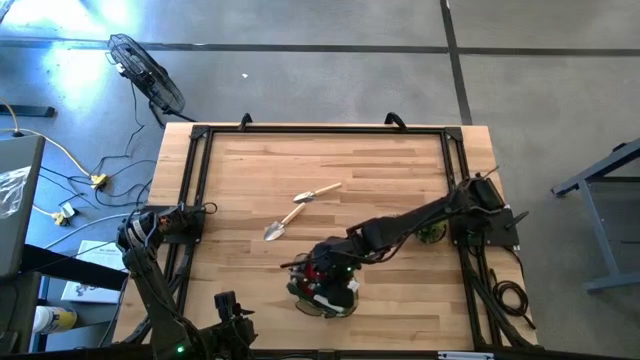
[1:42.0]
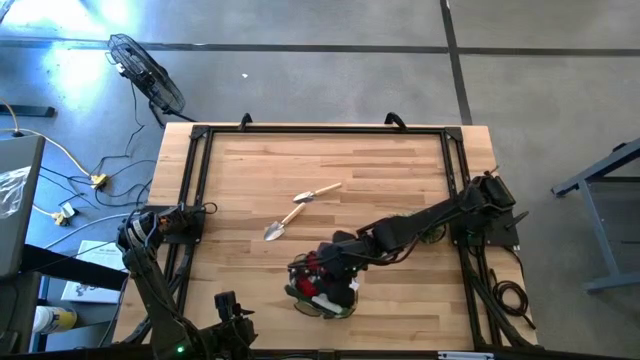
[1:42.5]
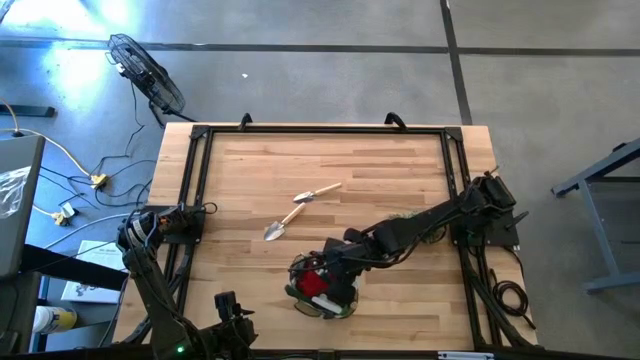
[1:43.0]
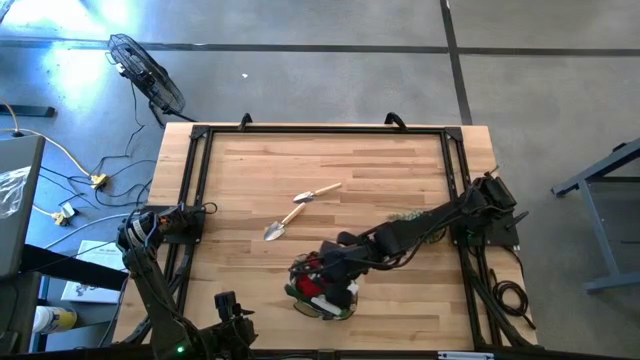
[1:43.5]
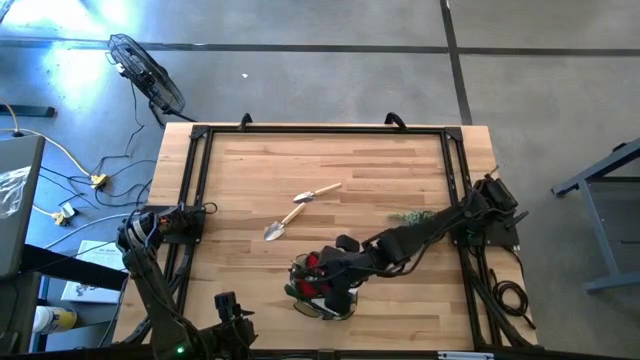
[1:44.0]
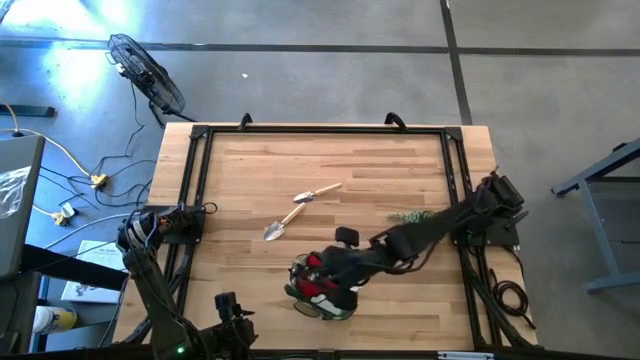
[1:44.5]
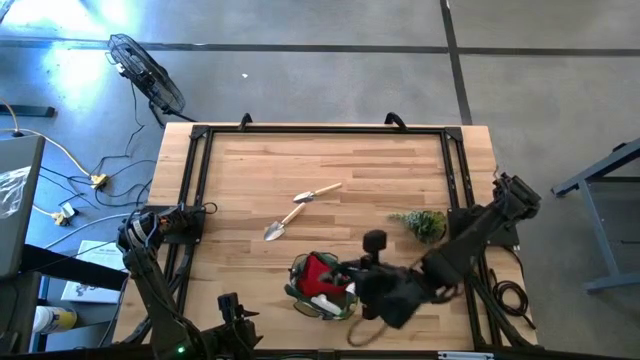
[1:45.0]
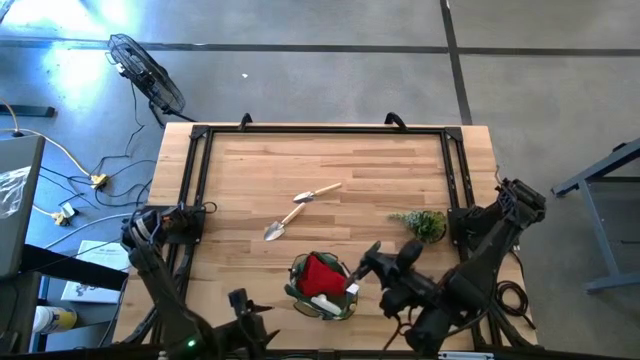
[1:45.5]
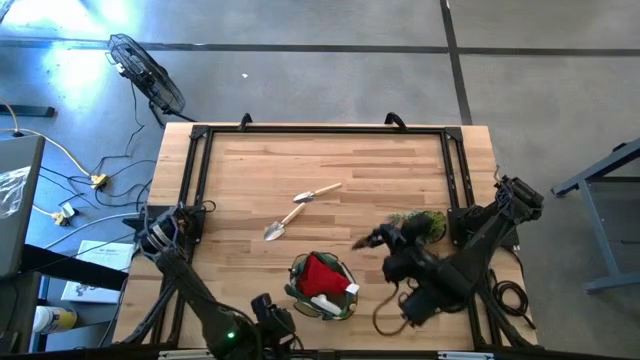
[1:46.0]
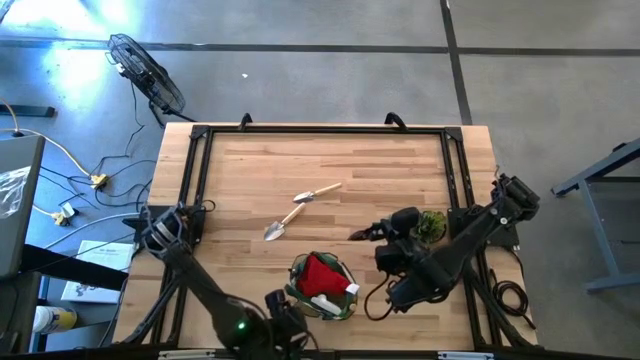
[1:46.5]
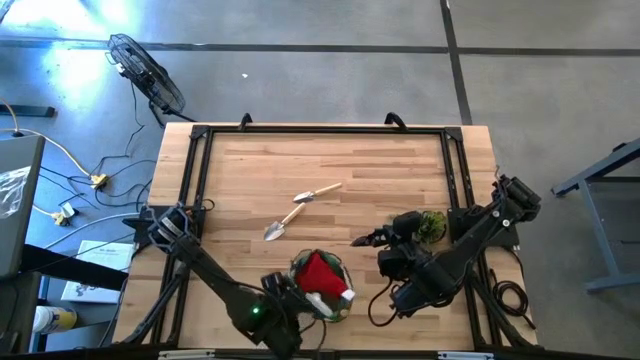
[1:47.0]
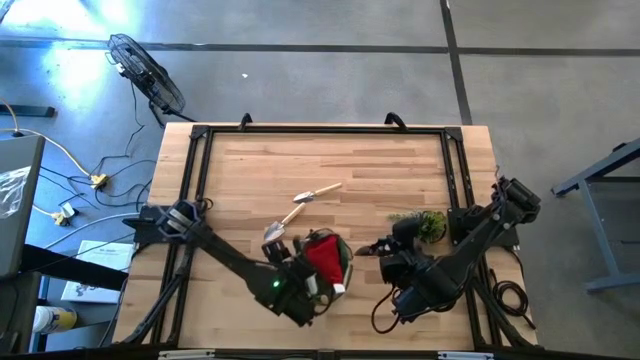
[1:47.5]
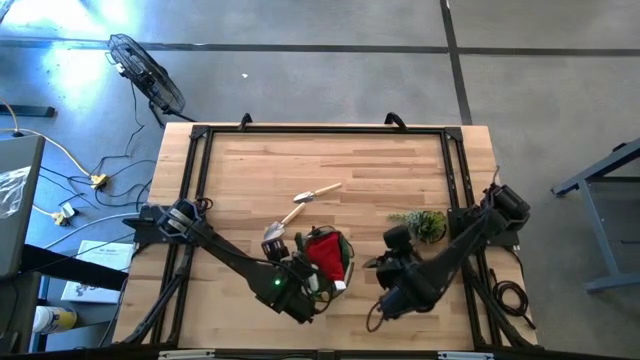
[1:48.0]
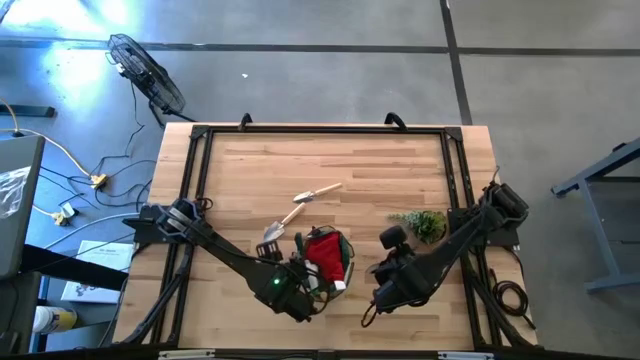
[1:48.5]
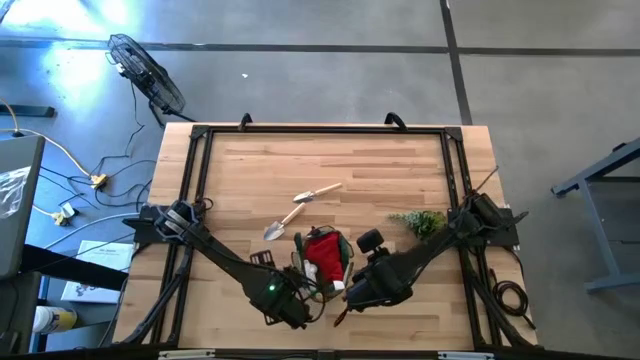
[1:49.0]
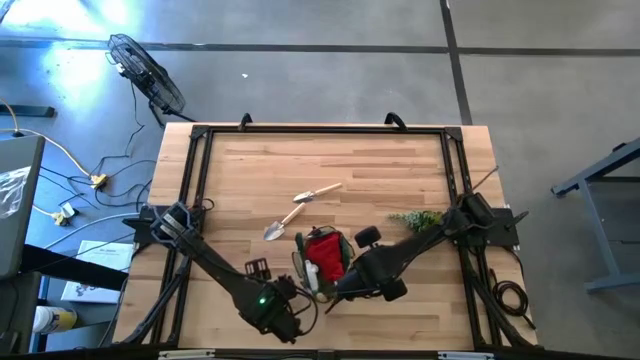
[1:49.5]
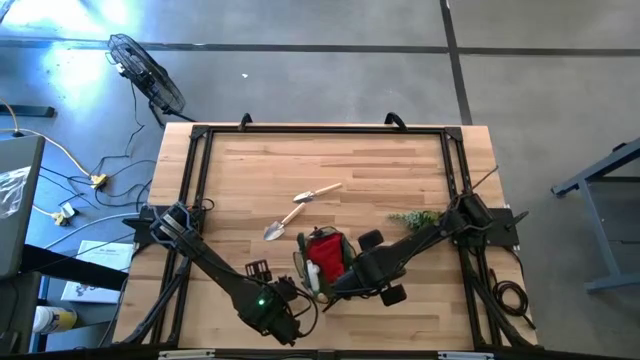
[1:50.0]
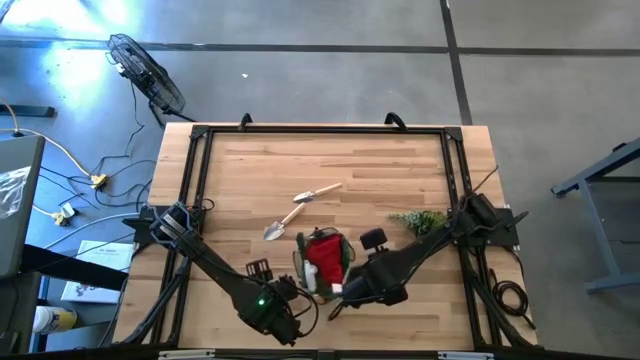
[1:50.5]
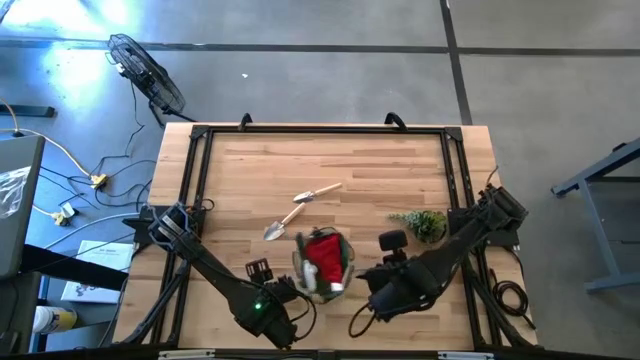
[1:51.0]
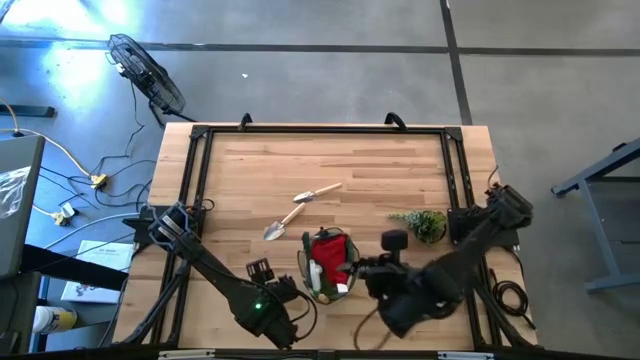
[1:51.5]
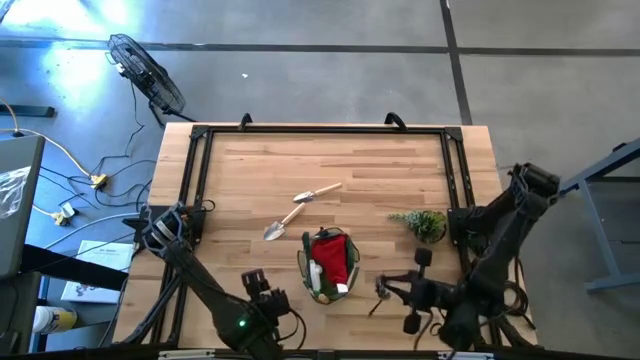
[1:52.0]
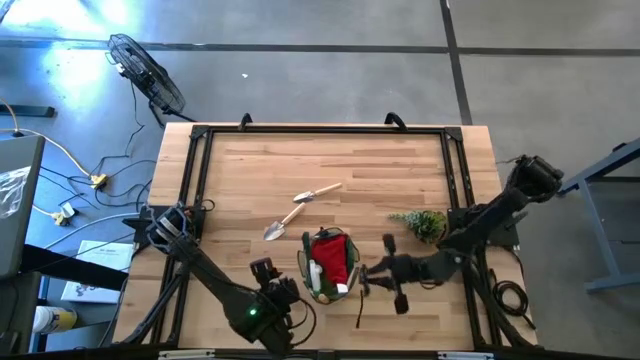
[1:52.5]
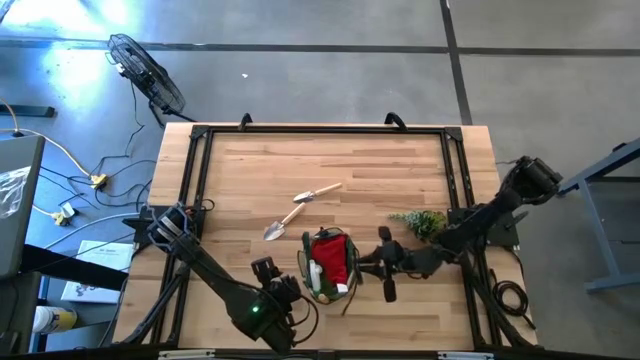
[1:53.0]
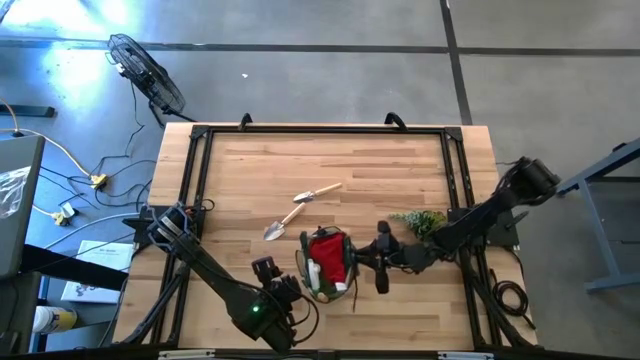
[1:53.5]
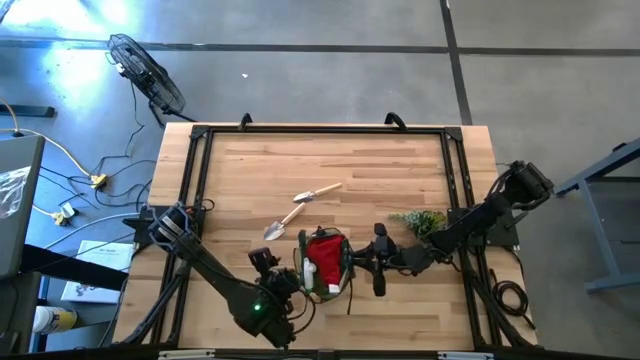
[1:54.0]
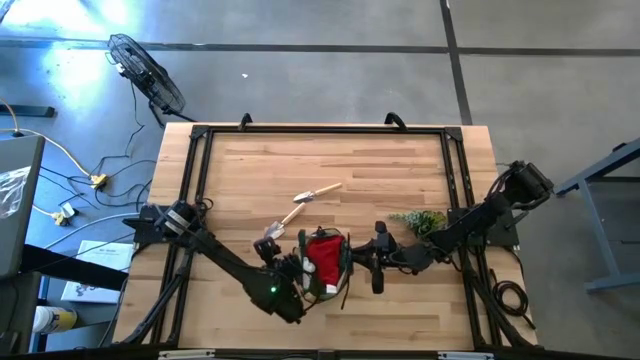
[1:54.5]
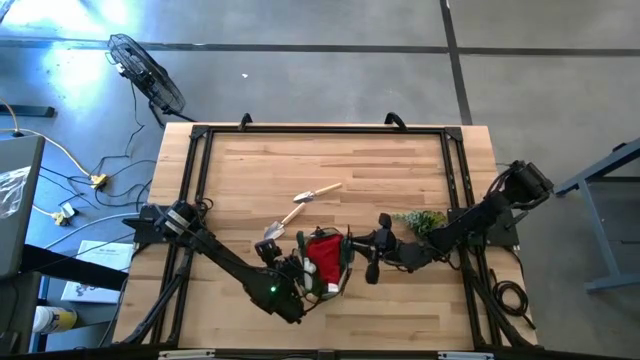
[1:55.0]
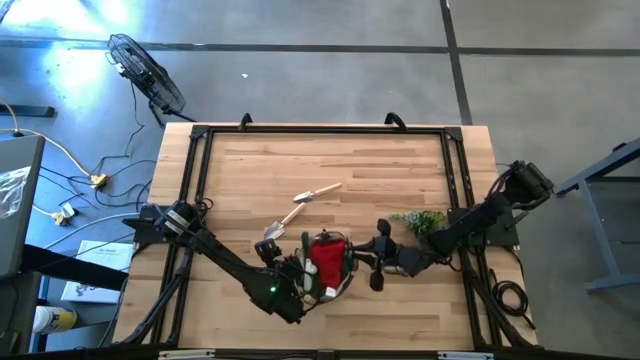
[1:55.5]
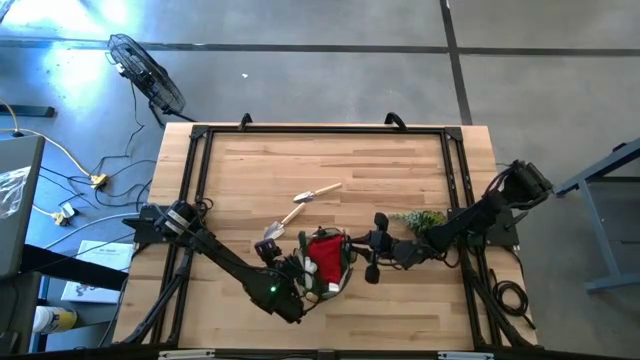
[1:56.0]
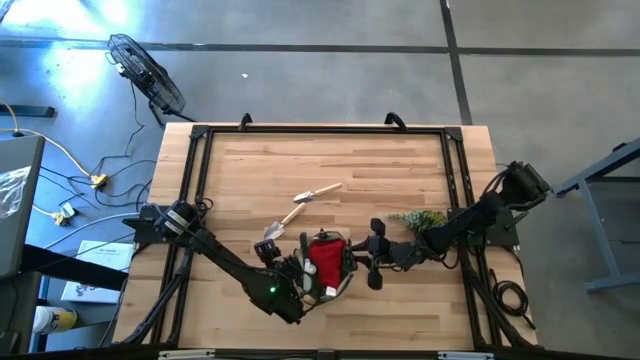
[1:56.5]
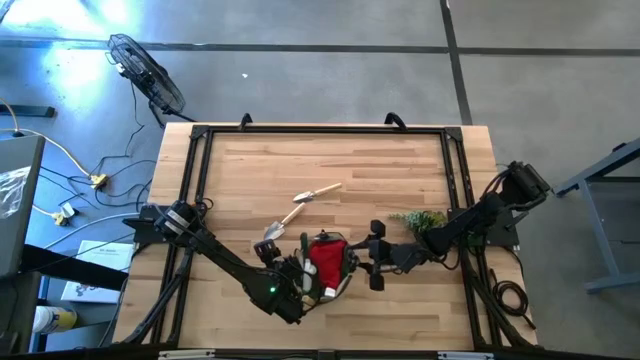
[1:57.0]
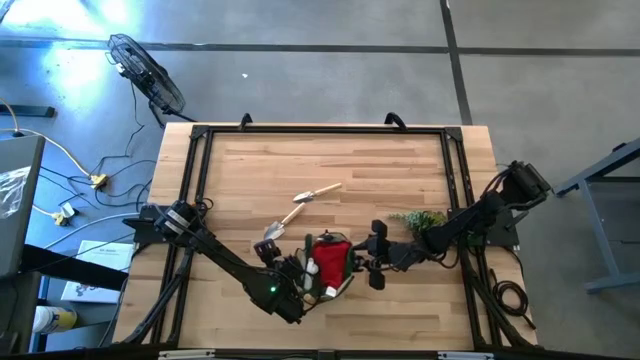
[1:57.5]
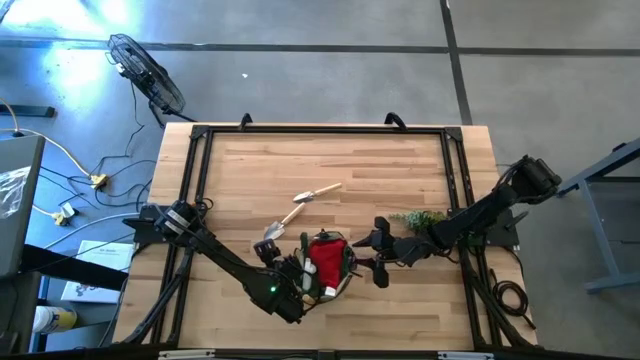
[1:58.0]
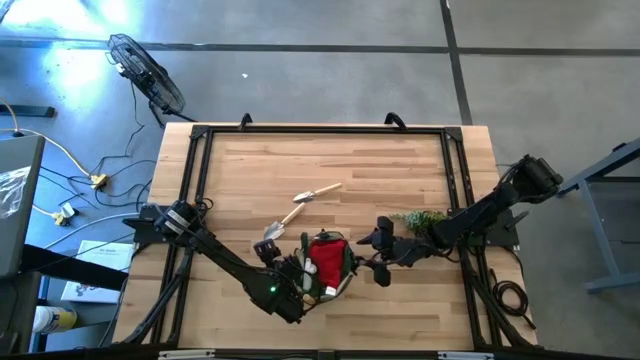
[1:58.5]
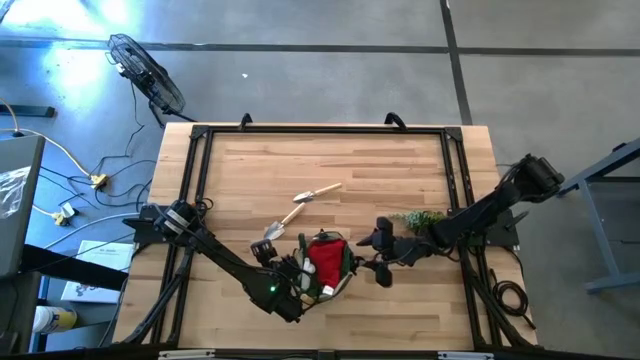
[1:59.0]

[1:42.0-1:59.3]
Task: Pick & Place Garden tools in Gardening bag
Put the green shear scissors into the gardening bag

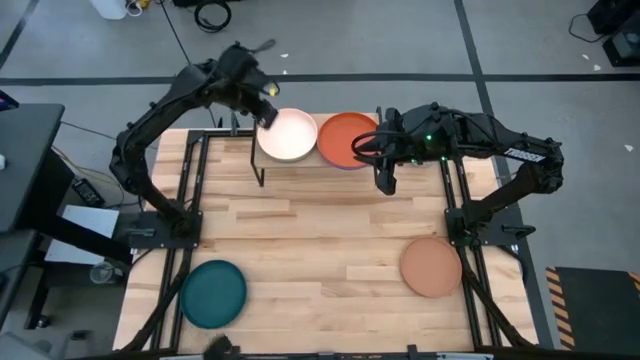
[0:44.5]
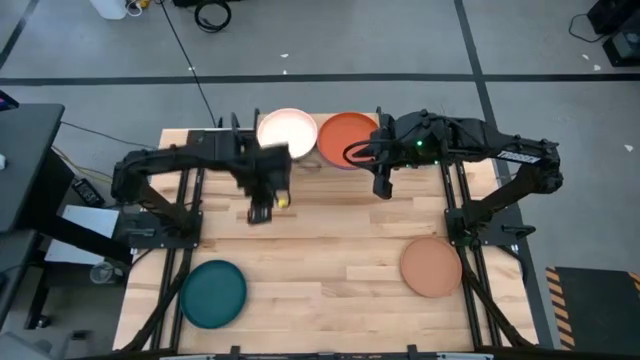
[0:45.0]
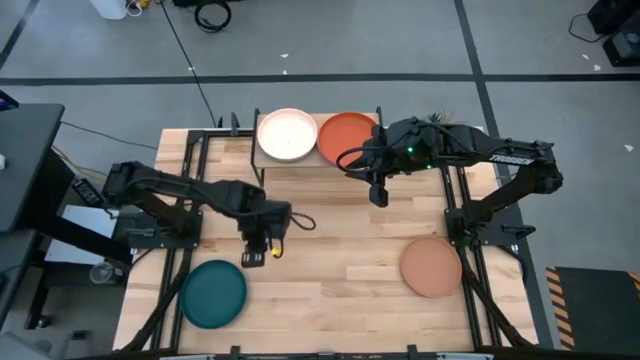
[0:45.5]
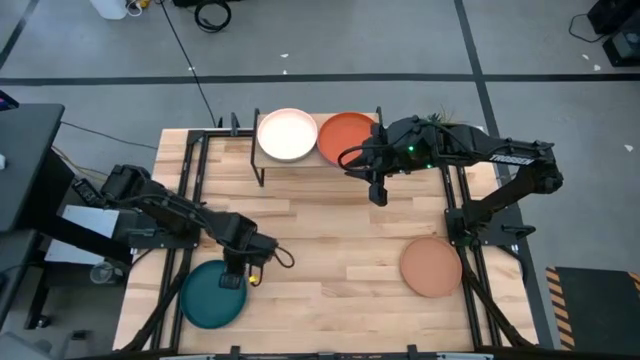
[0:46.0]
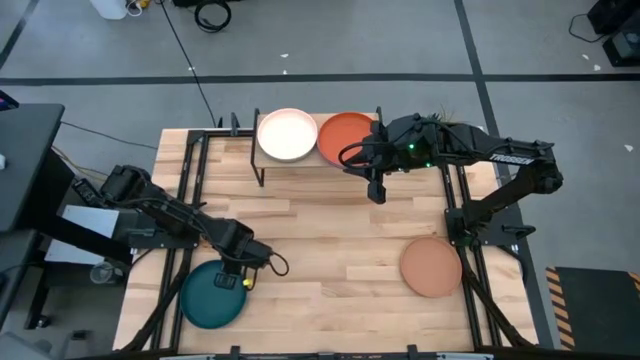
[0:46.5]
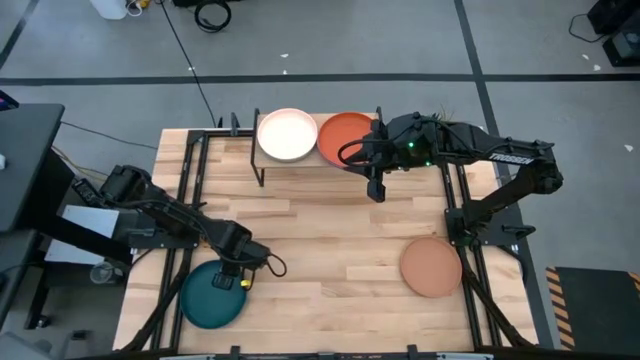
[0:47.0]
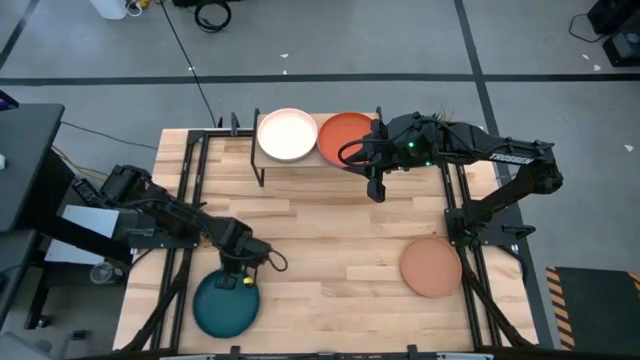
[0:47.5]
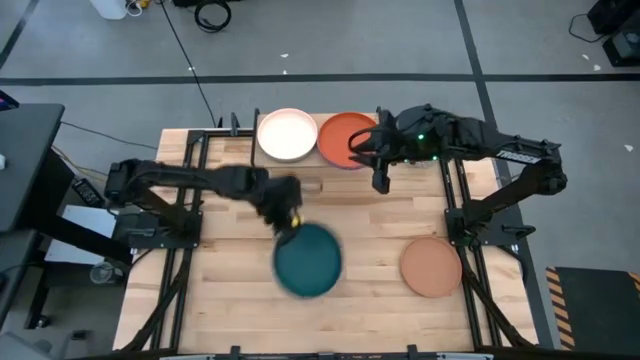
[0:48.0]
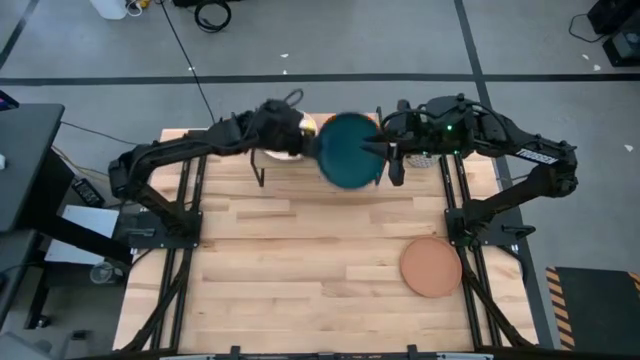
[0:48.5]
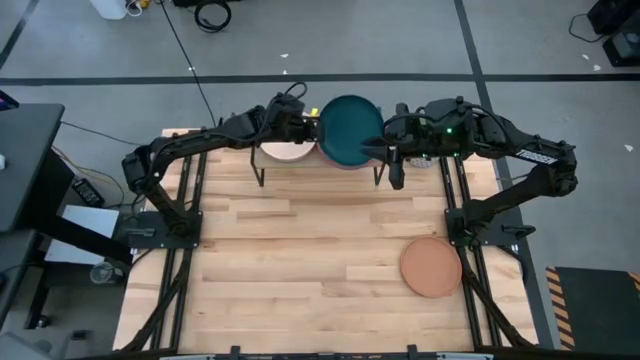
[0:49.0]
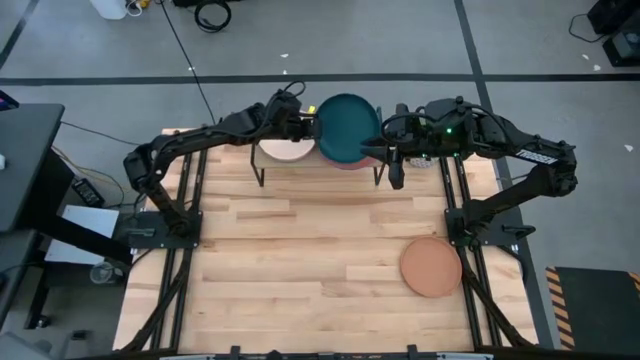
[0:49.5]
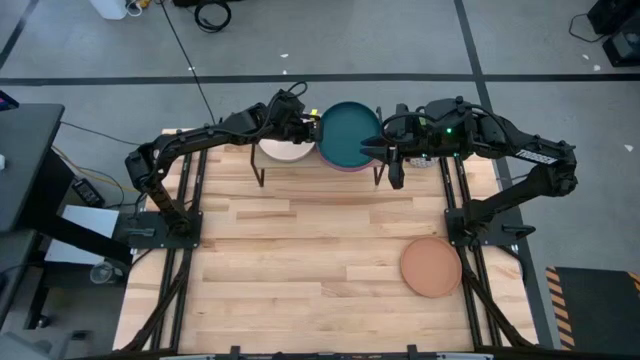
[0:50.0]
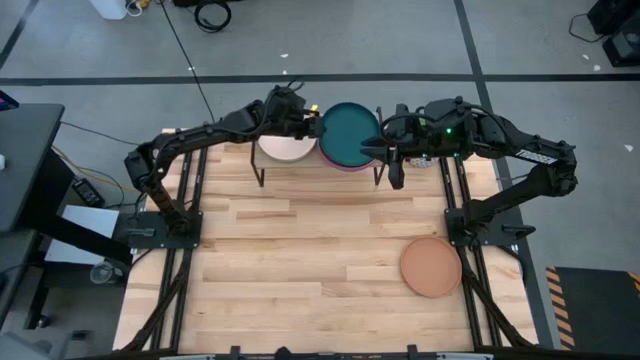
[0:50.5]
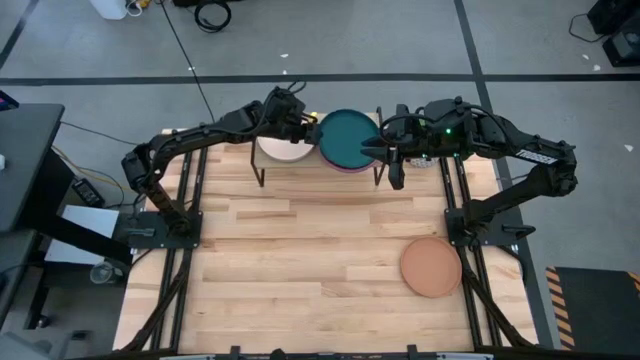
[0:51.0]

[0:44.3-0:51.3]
Task: Place and stack plates onto a shelf
Stack the dark blue plate on top of the orange plate on the shelf
